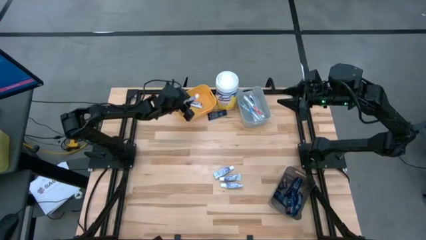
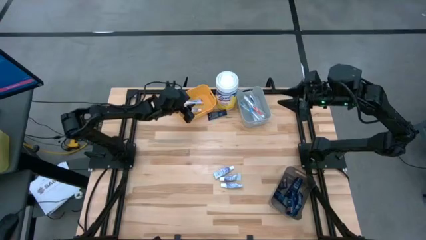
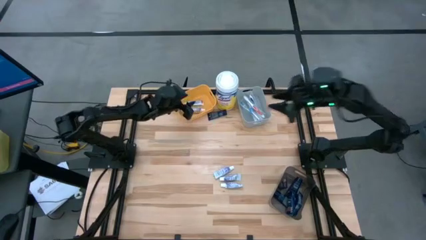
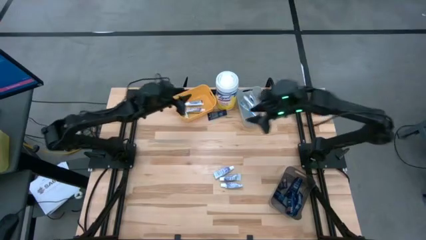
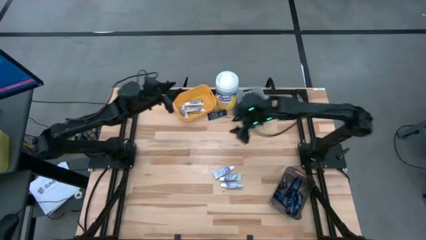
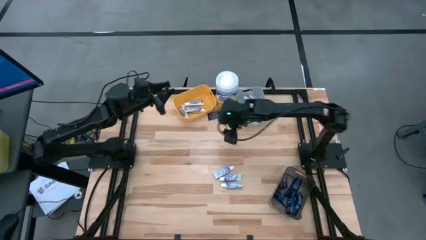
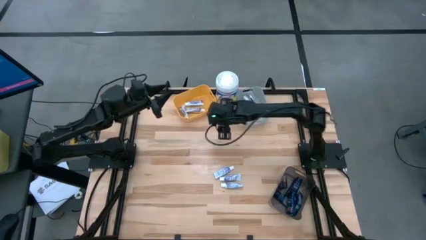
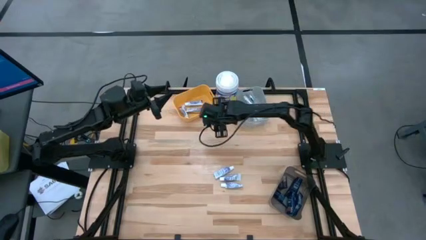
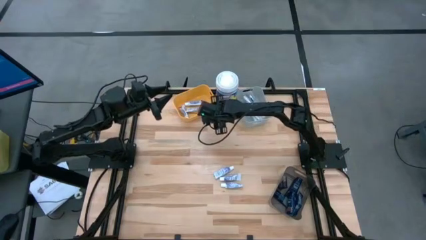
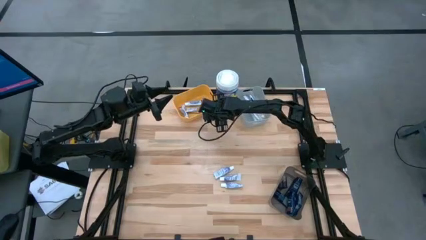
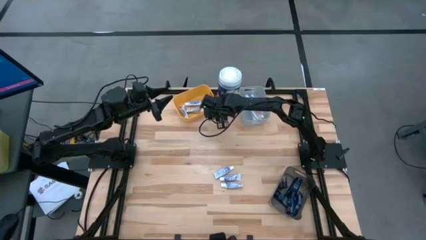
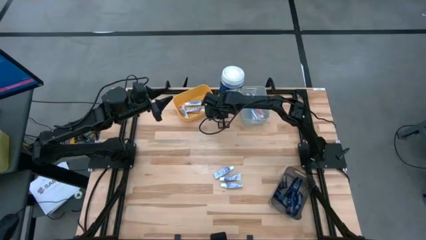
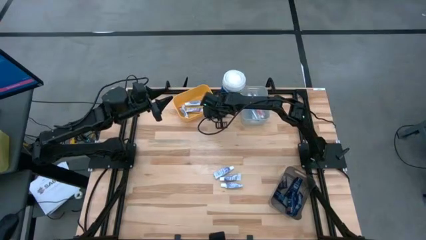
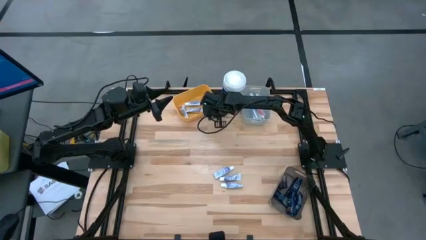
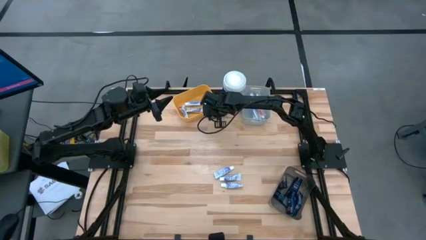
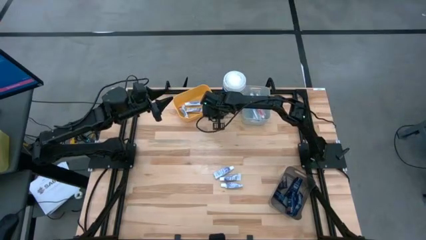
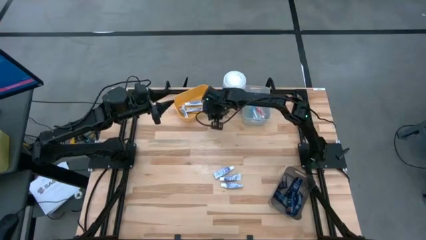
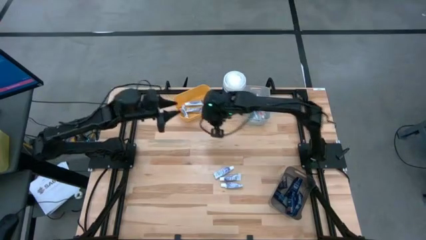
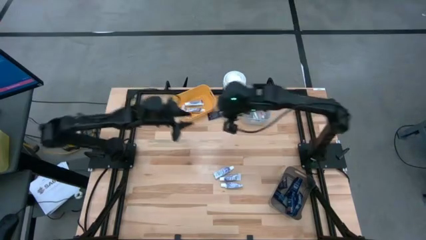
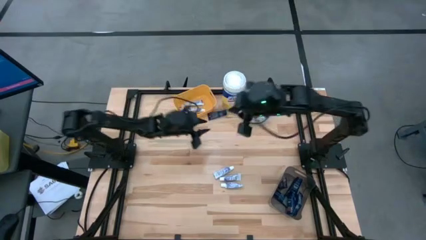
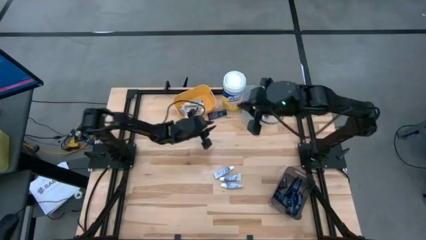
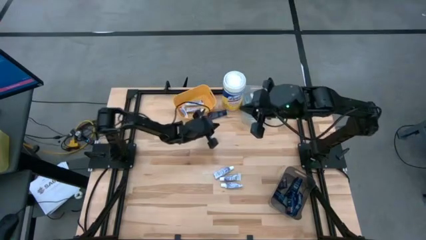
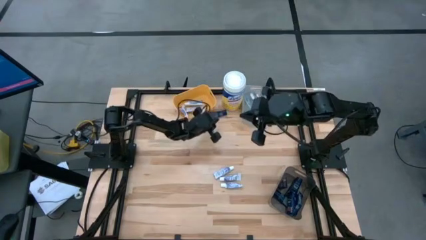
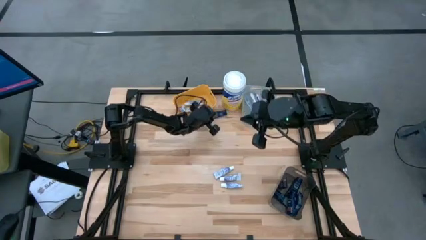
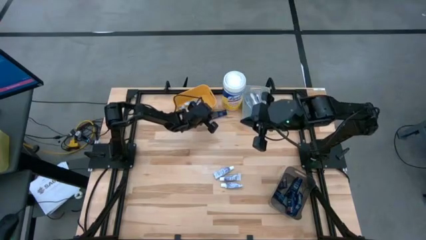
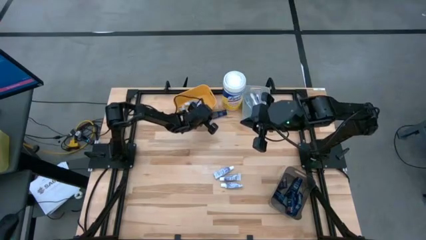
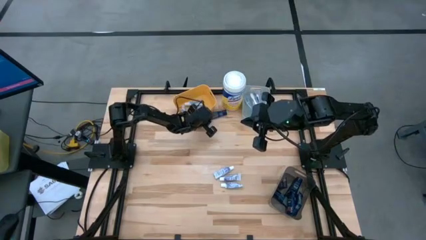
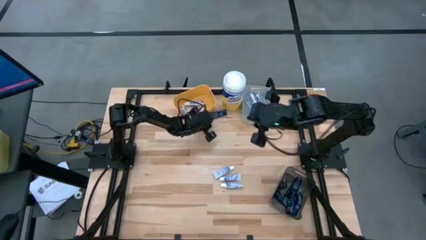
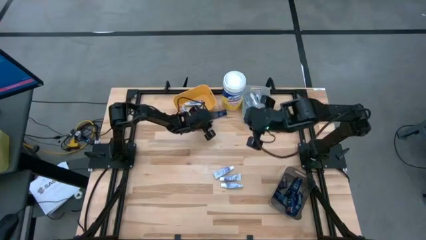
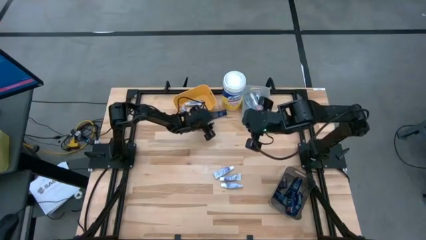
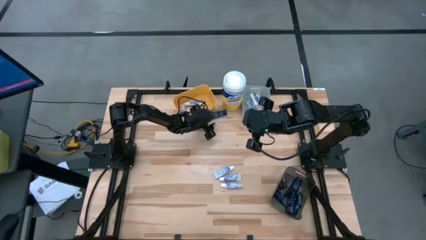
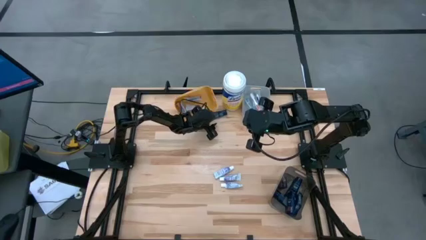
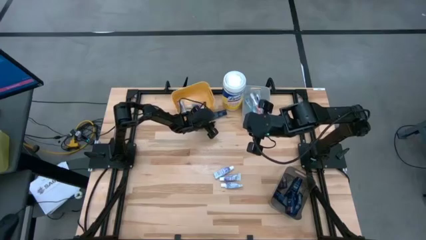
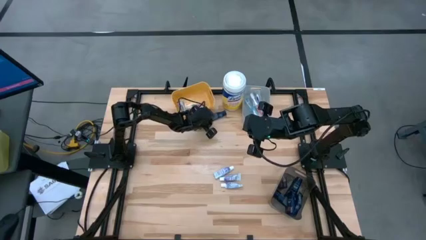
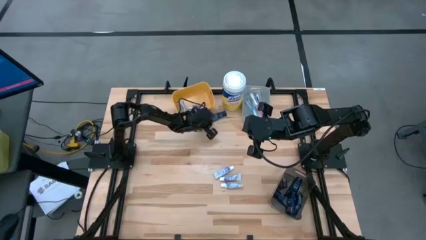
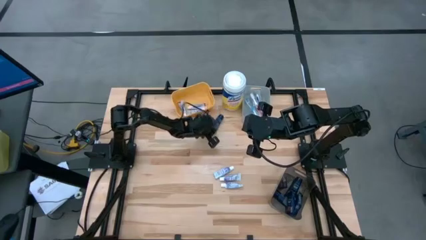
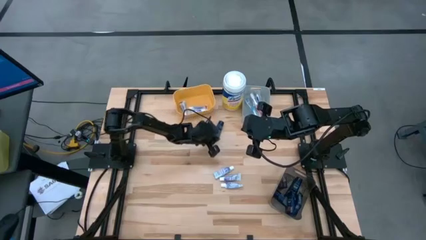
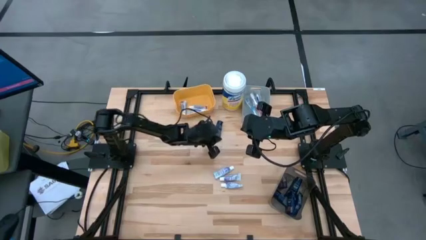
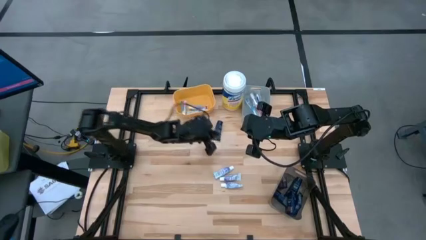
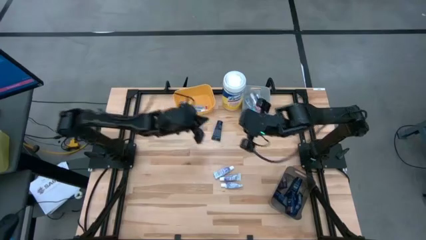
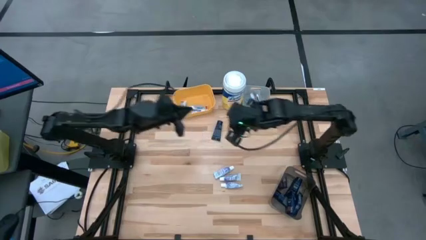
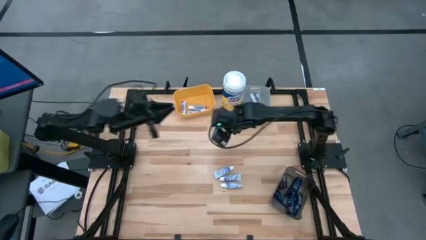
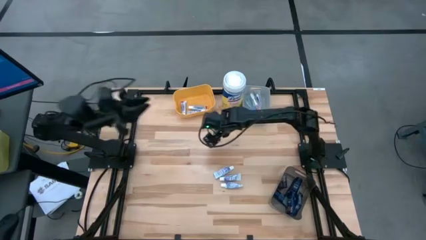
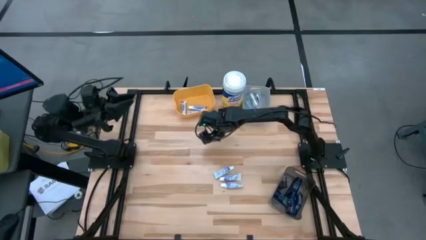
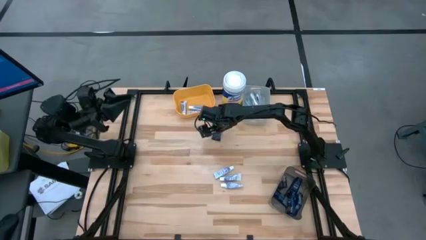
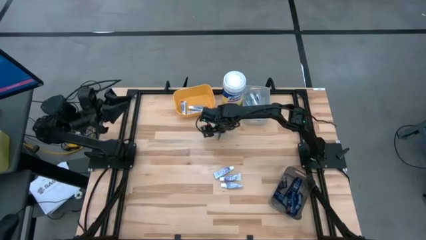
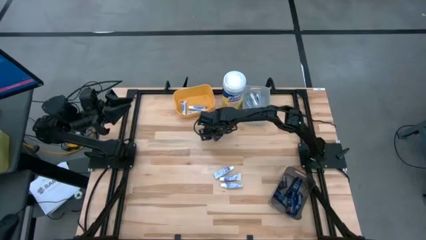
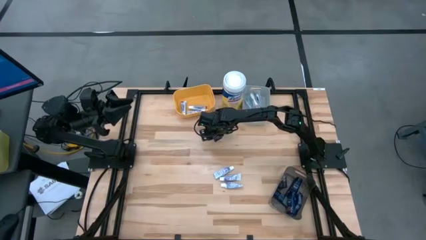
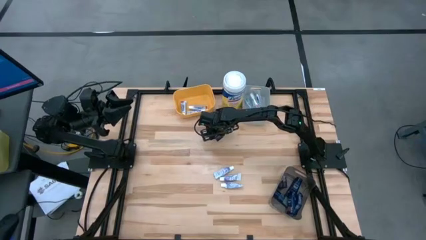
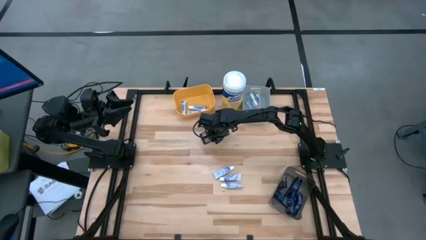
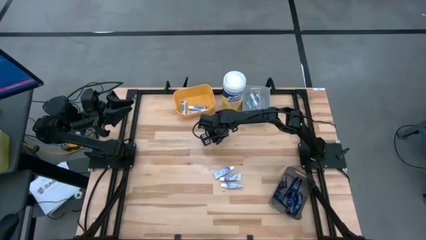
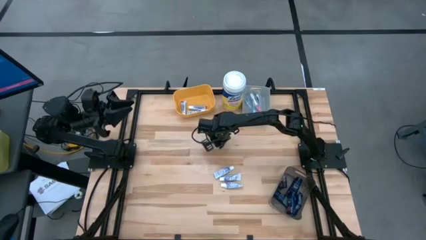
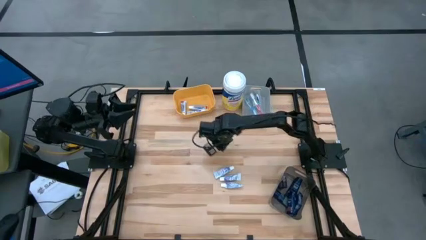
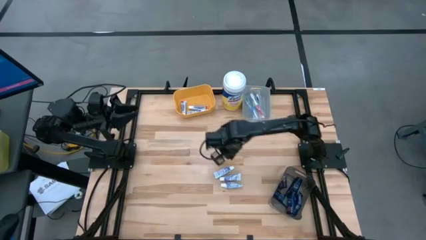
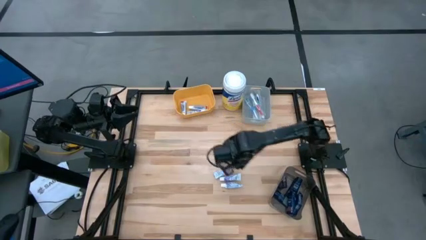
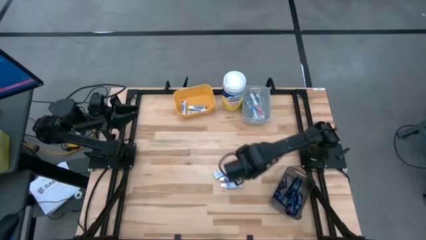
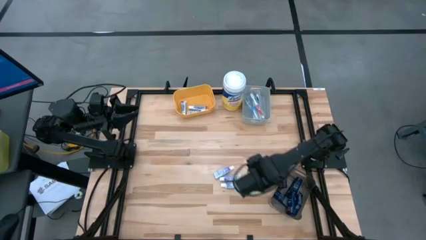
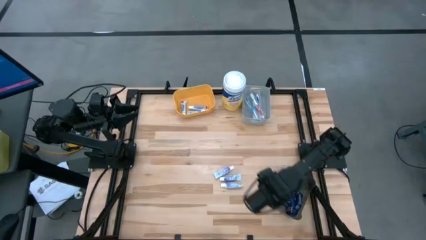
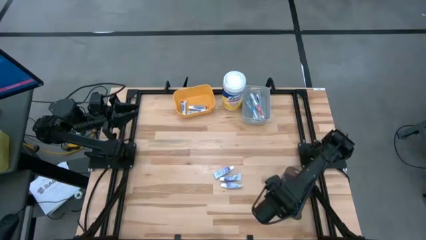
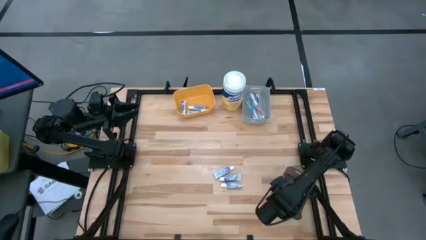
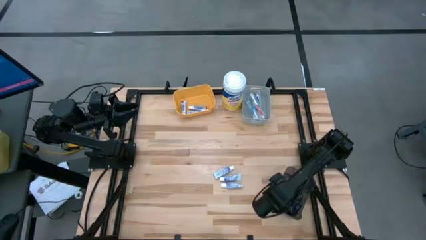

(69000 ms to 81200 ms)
Task: Pick & Place Travel size toiletries
Put the blue shaving butter into the black bin

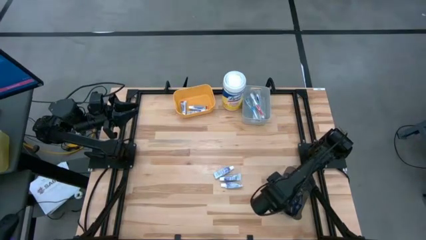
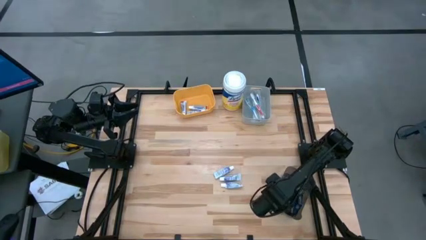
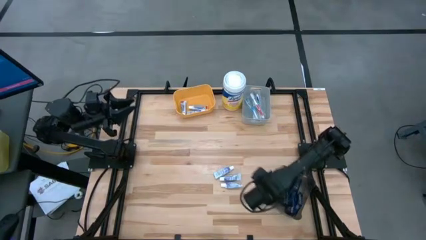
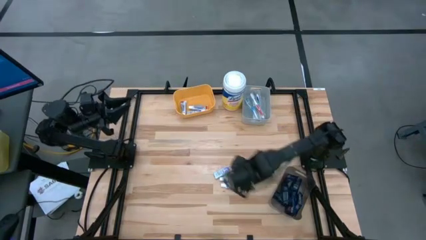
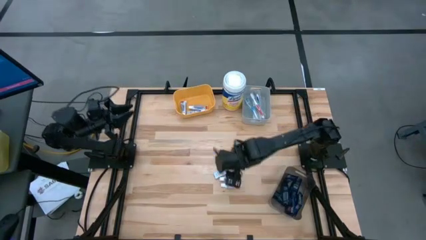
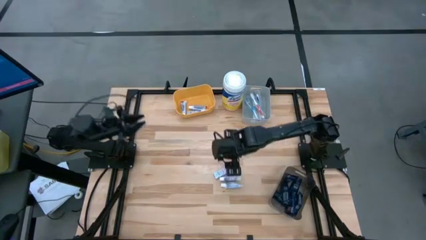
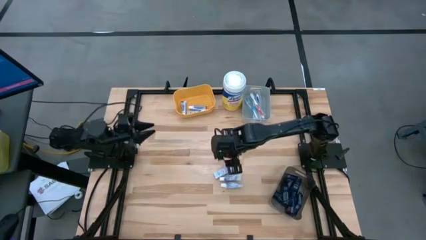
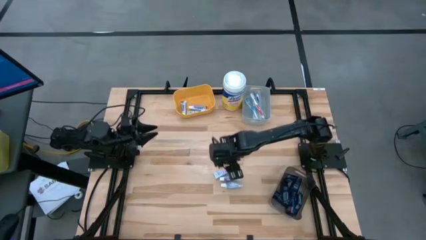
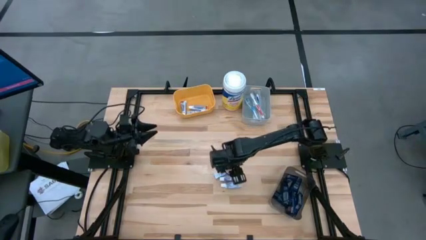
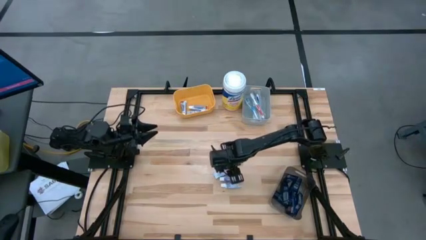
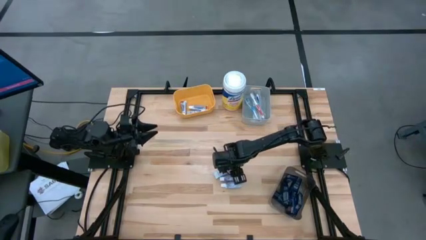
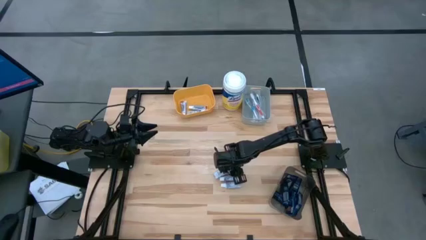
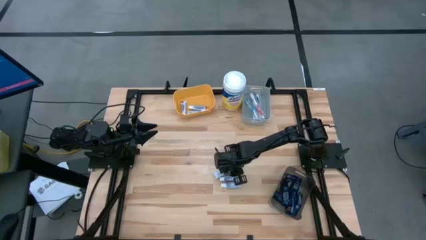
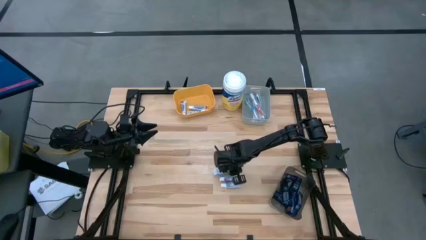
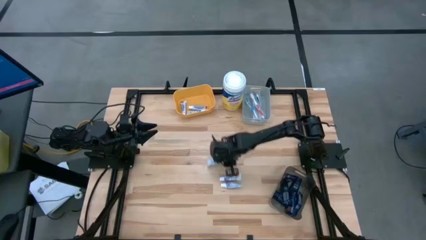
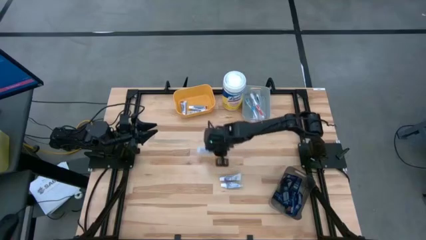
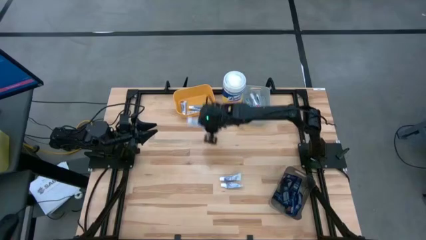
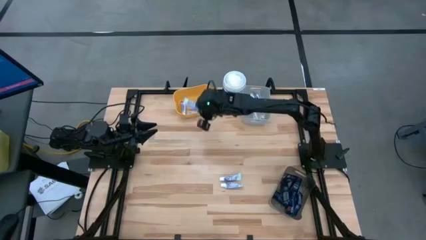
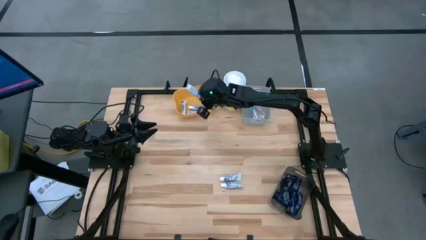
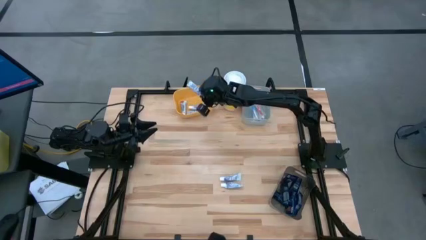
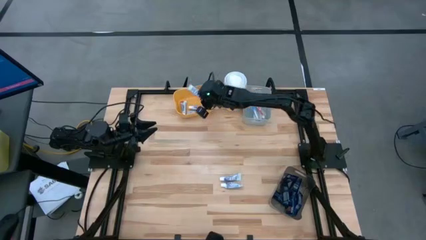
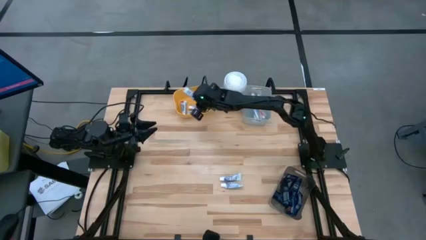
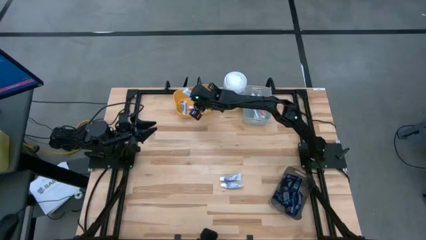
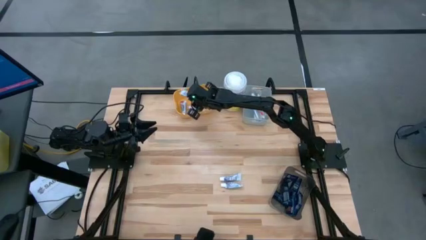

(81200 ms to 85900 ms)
Put the violet toothpaste into the yellow bin
